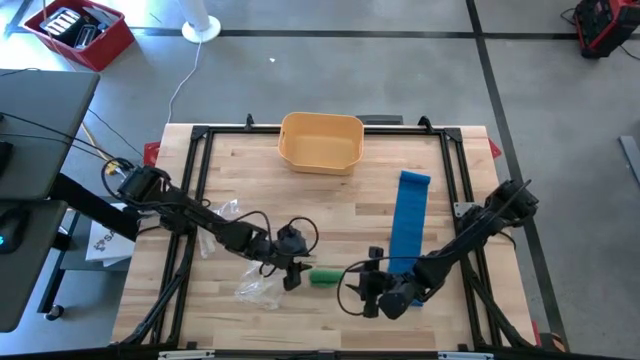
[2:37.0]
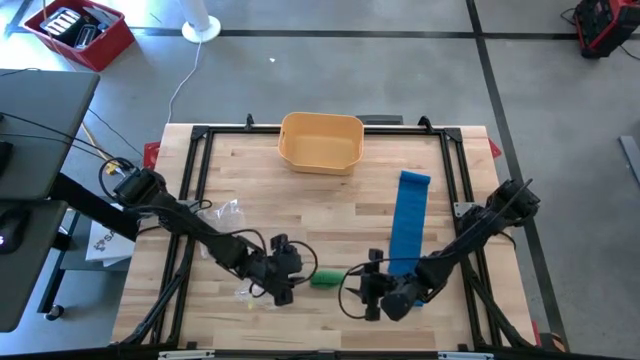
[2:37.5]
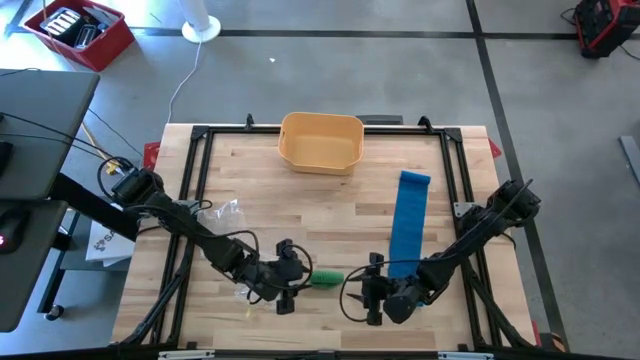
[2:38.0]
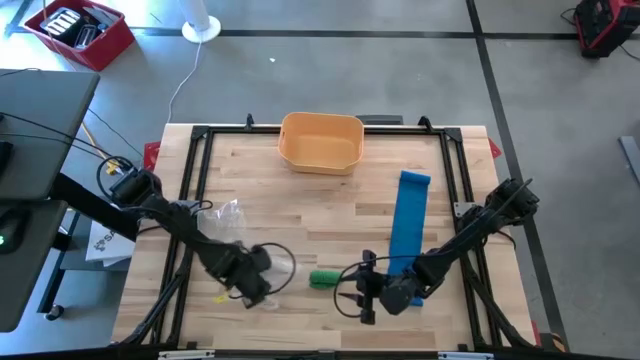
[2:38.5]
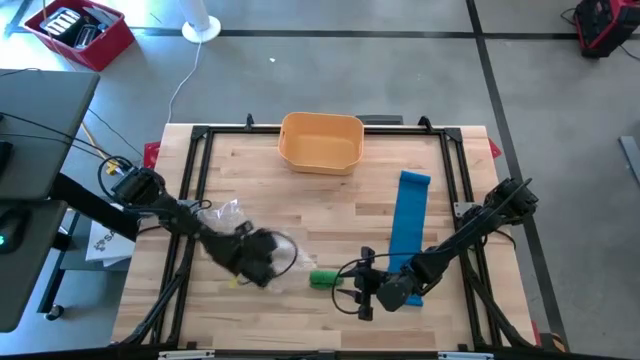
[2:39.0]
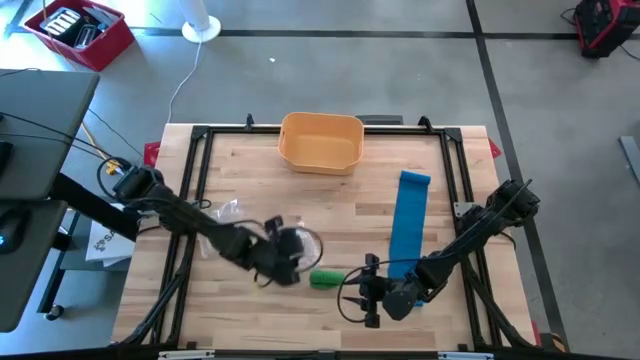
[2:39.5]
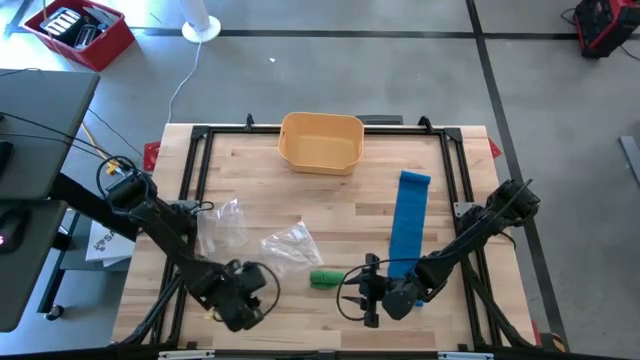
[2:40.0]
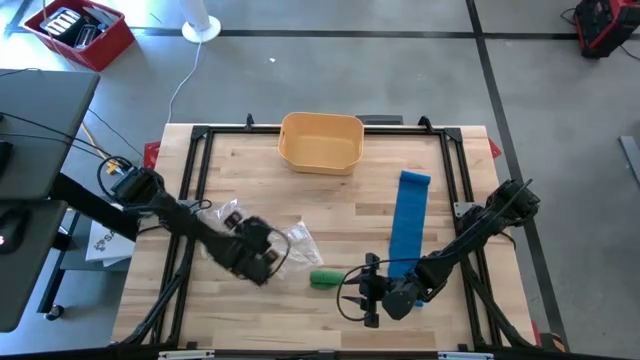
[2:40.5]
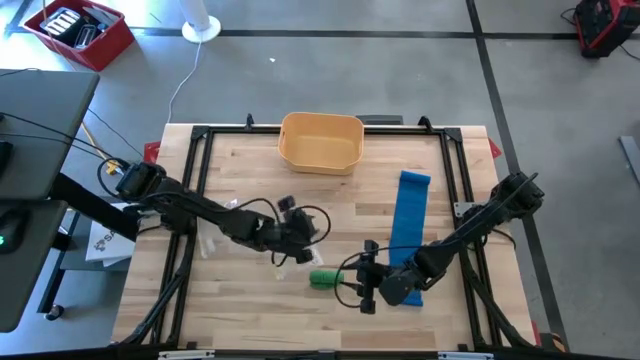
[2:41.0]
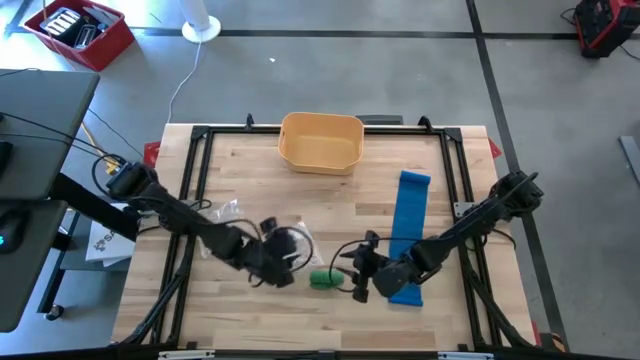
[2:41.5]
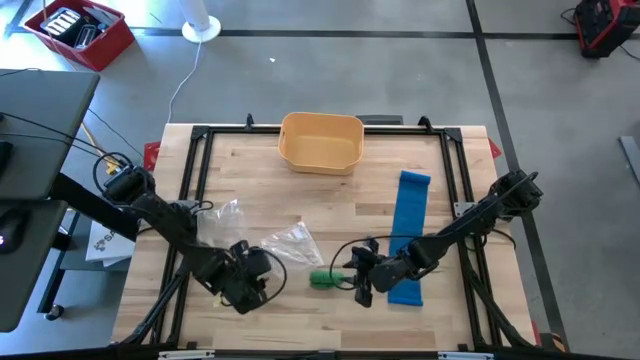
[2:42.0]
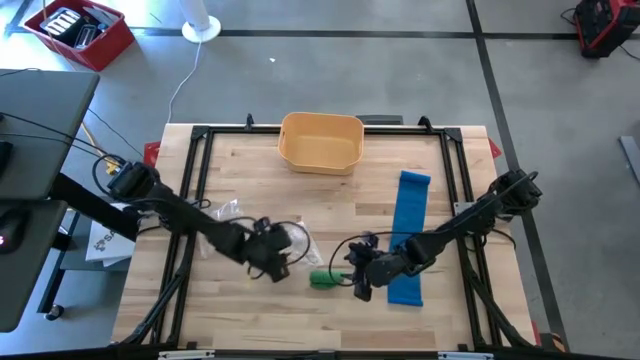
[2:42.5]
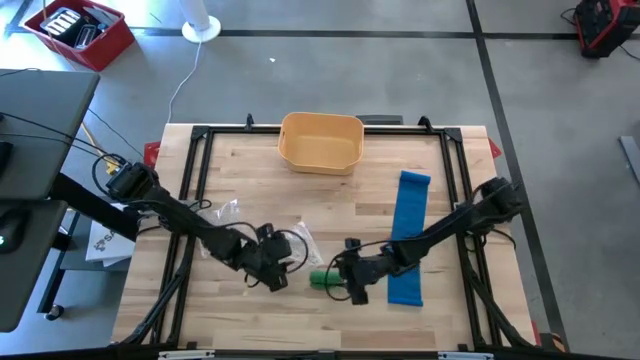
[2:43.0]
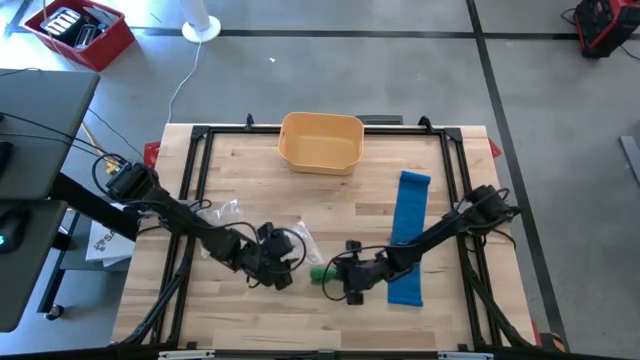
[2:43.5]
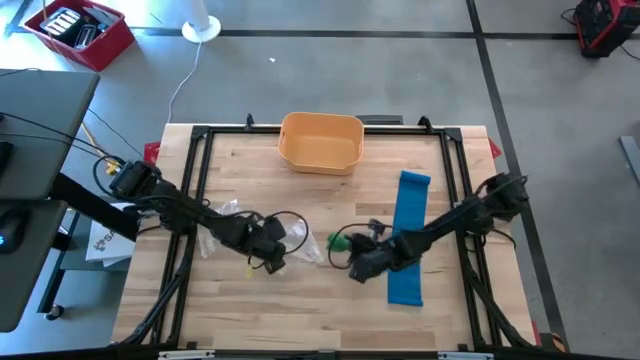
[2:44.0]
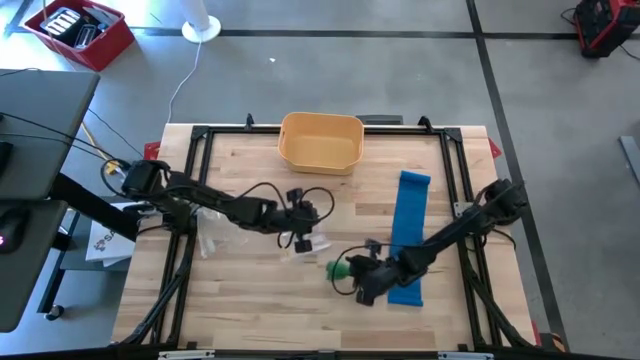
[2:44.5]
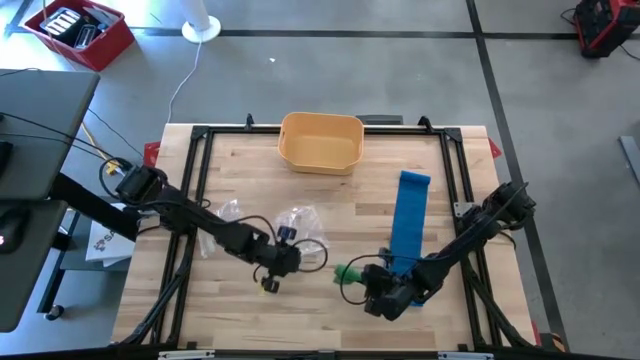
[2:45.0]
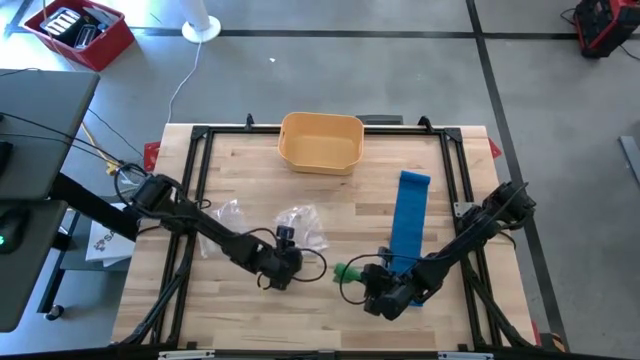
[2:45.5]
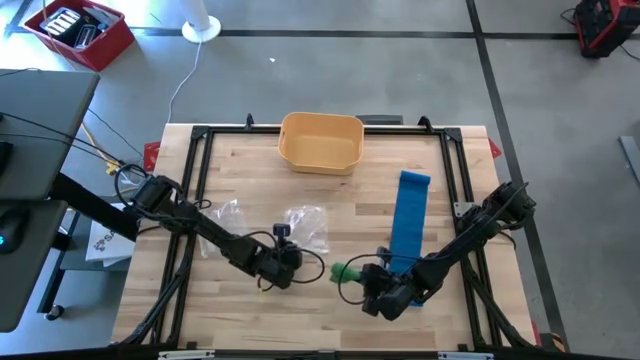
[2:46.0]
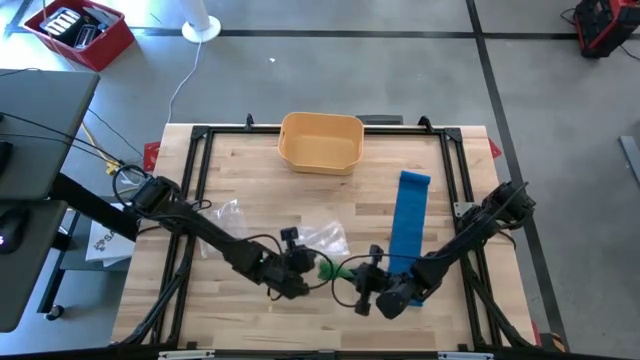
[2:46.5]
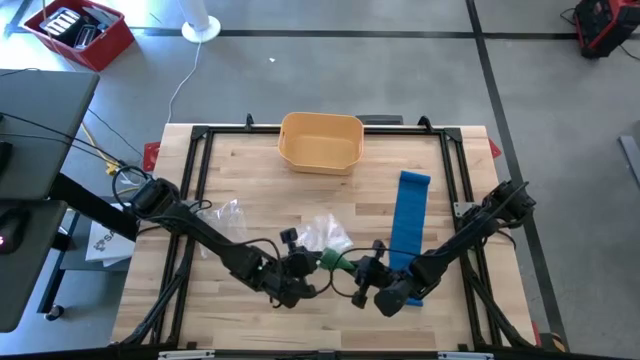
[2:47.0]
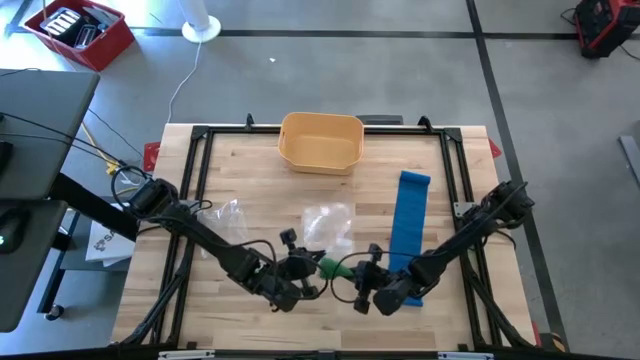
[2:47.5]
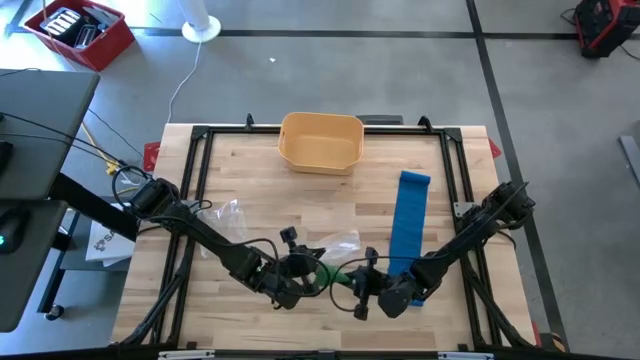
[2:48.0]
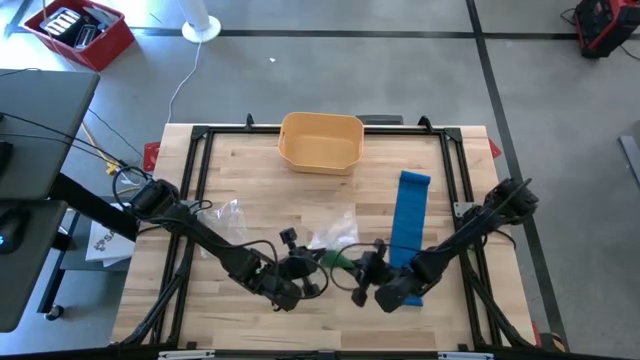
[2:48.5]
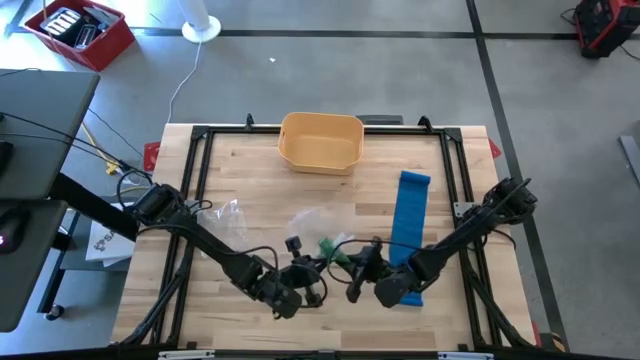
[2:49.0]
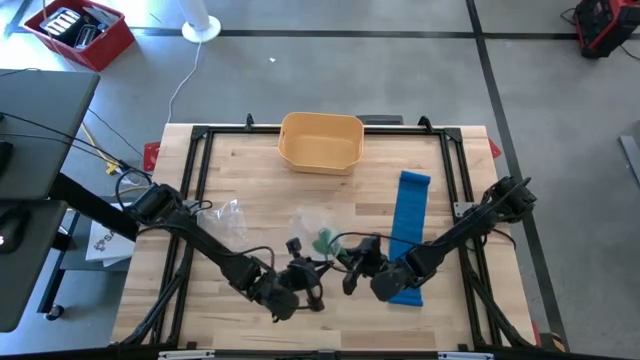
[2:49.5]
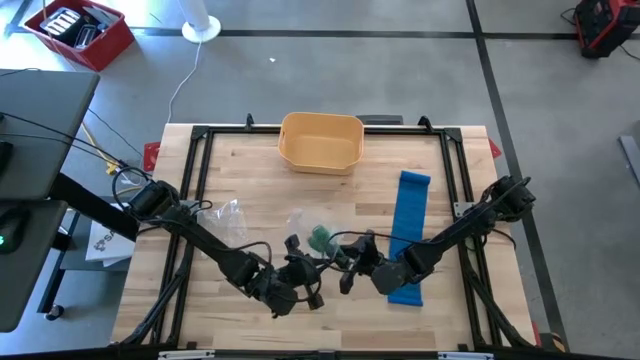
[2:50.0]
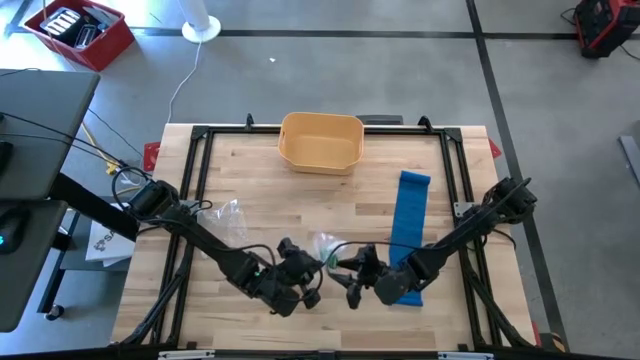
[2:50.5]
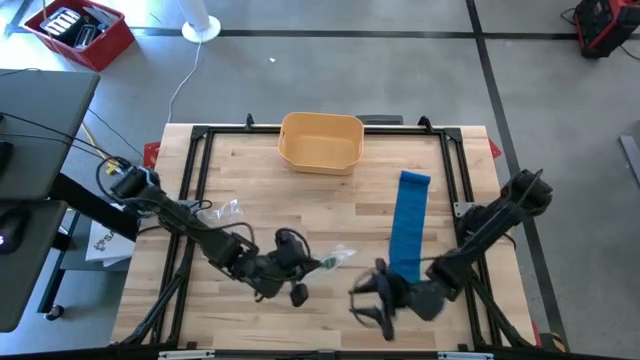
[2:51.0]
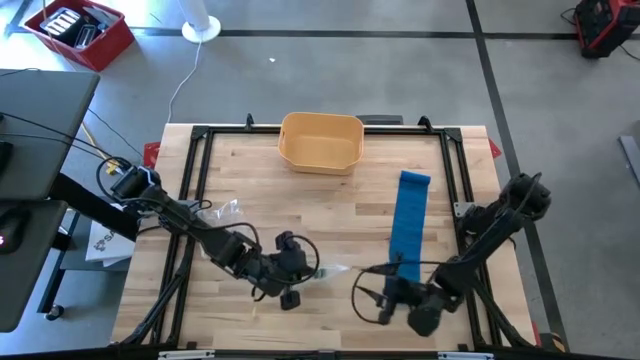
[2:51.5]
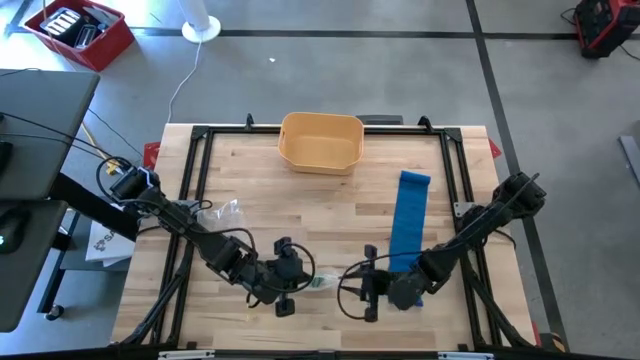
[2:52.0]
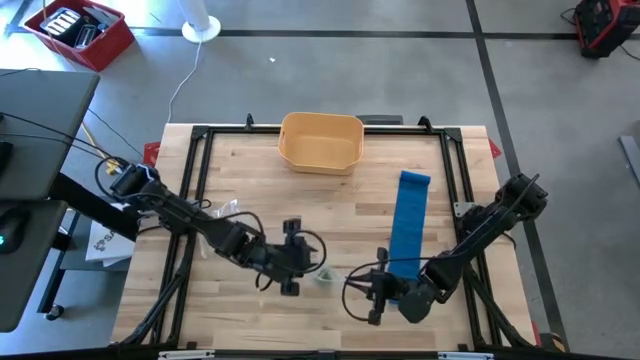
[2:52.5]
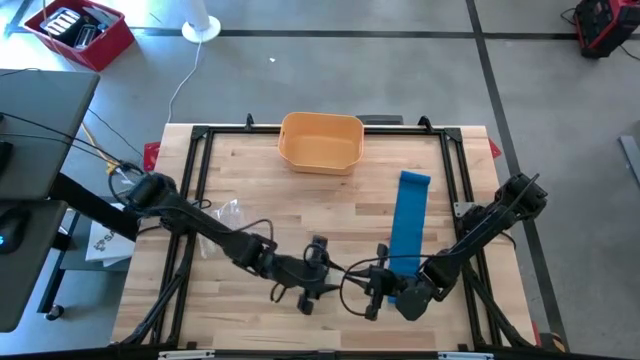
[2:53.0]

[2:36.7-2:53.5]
Task: Roll bandage
Put the green bandage to the transparent zip bag

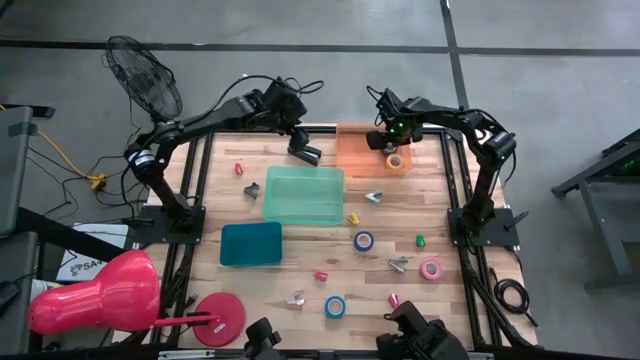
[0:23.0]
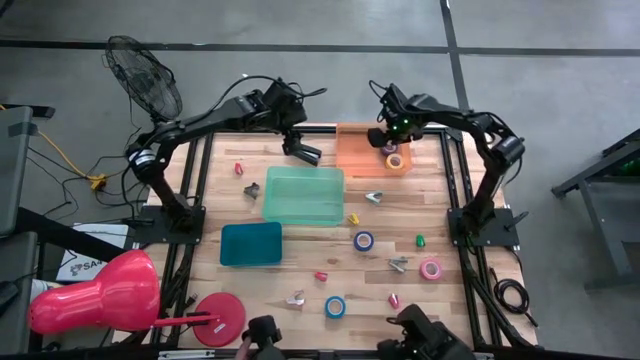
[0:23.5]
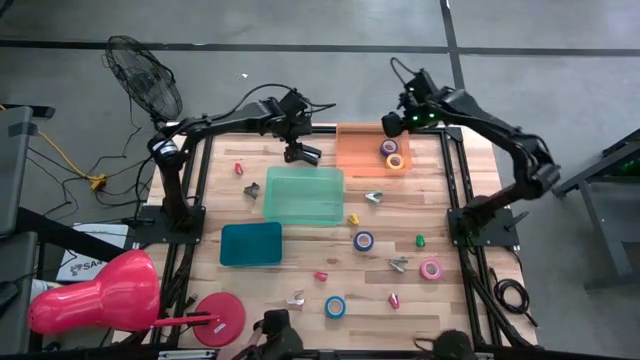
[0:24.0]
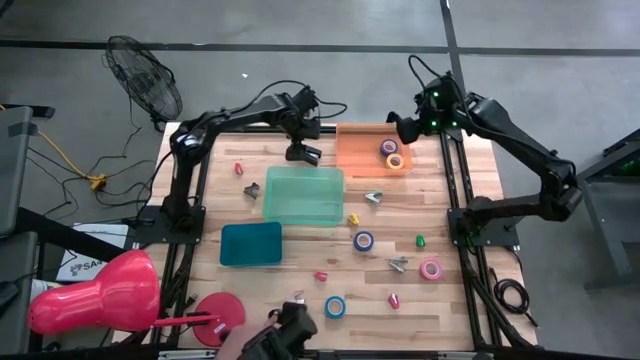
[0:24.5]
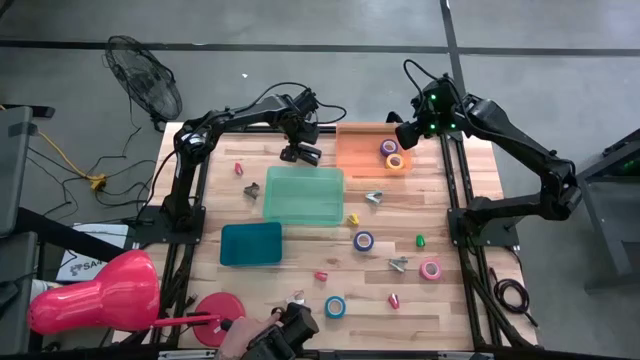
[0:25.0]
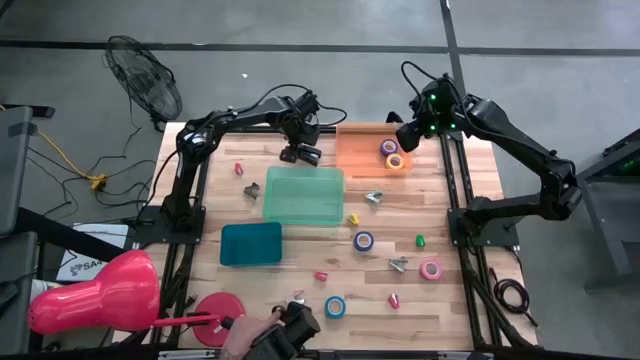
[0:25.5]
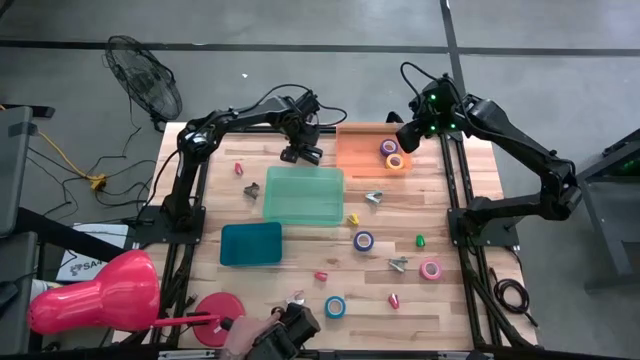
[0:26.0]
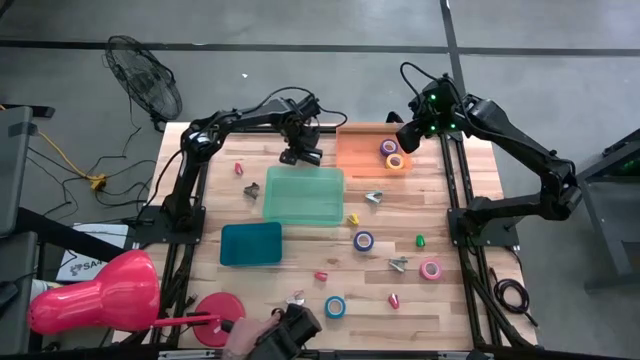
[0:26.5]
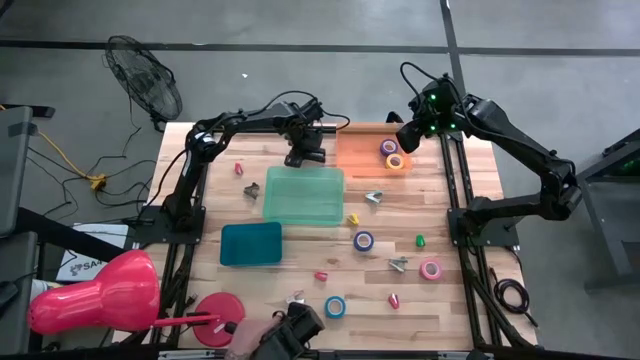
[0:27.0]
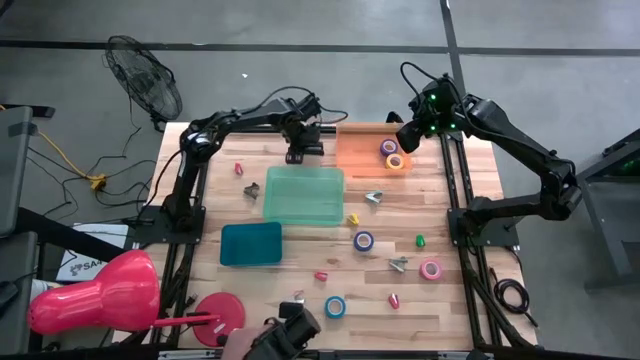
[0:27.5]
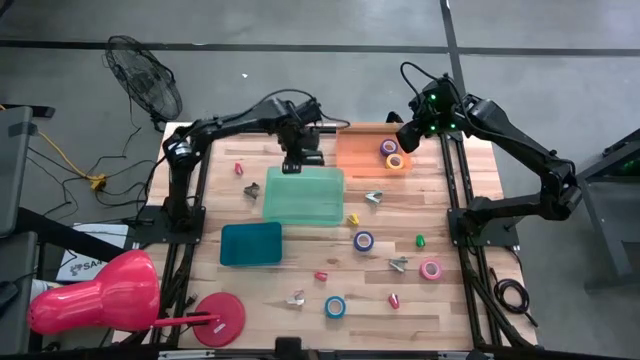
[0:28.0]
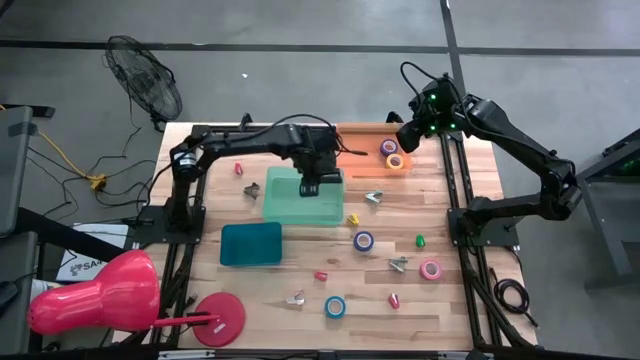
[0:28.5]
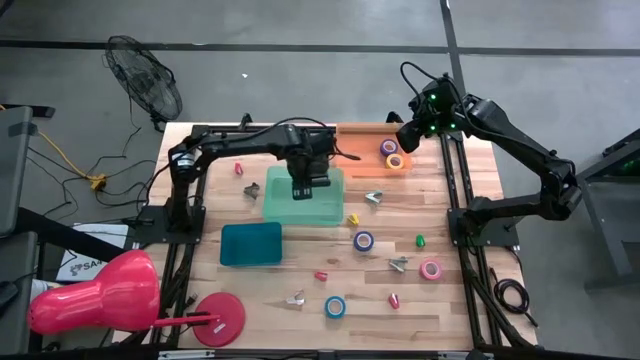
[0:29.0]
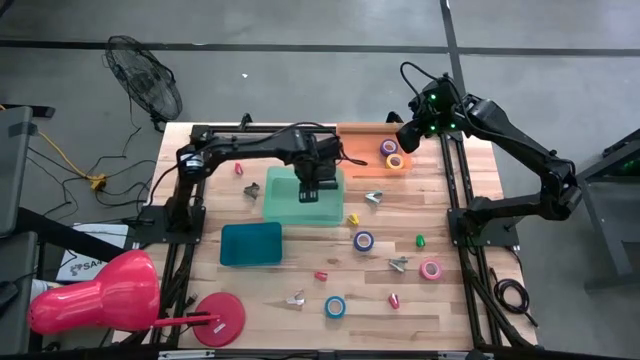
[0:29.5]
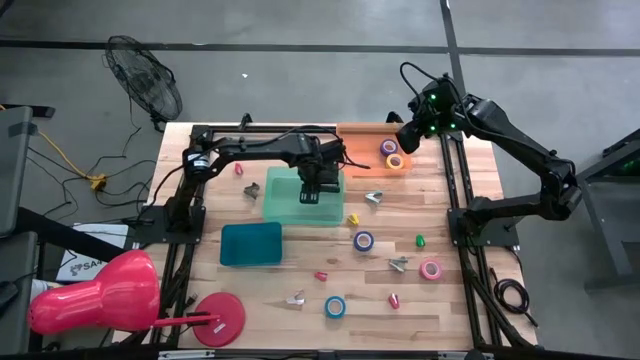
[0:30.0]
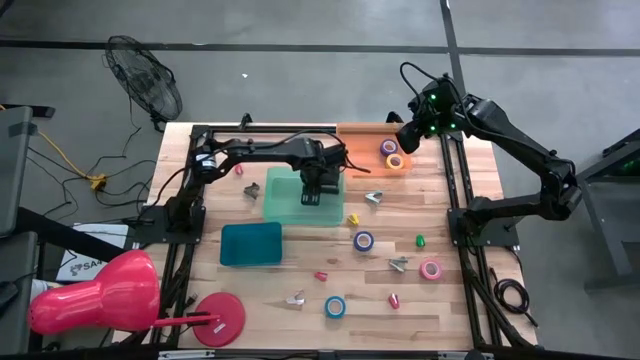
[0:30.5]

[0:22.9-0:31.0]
Task: Pick and place Stapler, Stapler remover, tape
Put the large black stapler in the light green bin
